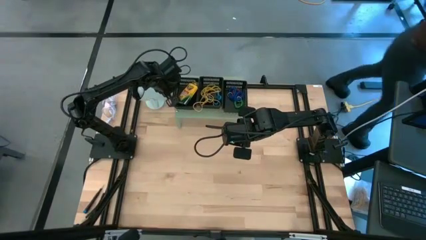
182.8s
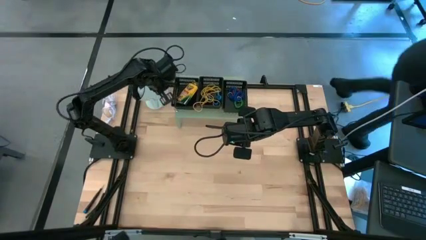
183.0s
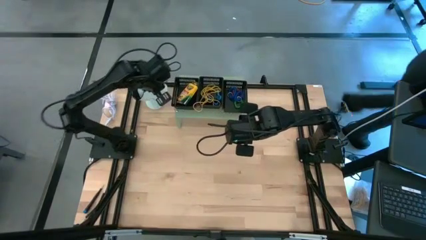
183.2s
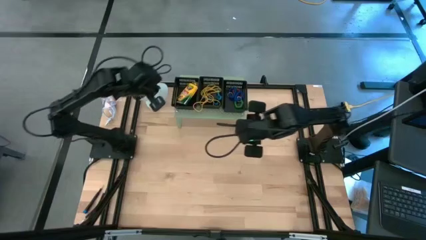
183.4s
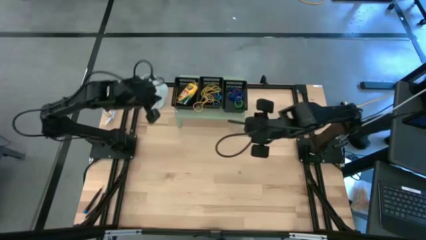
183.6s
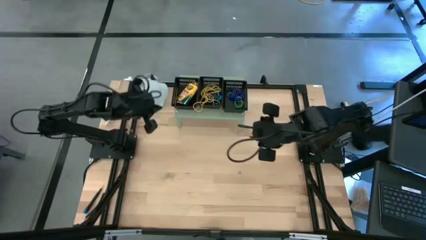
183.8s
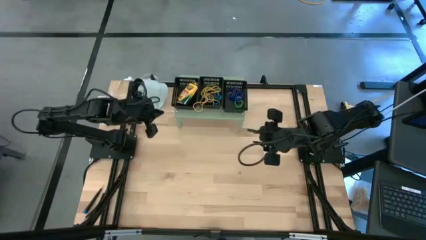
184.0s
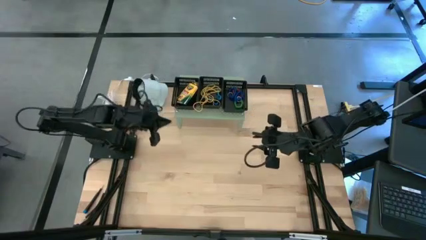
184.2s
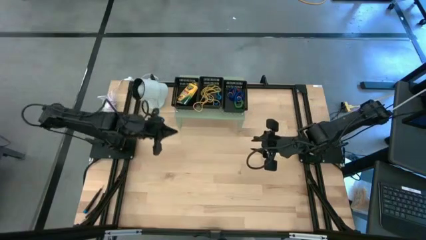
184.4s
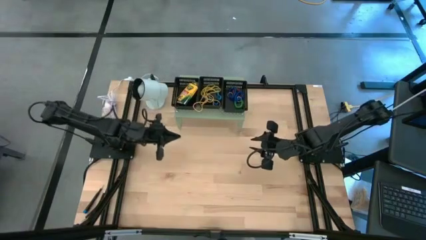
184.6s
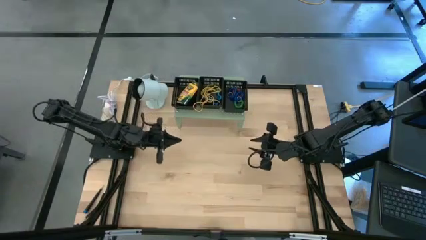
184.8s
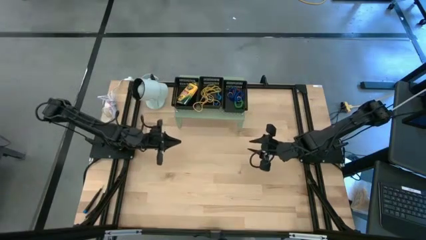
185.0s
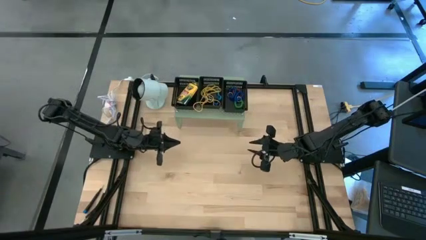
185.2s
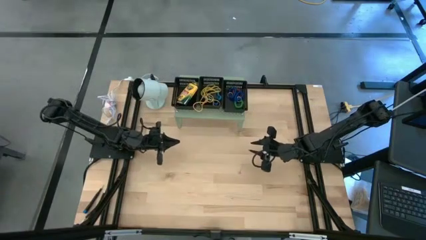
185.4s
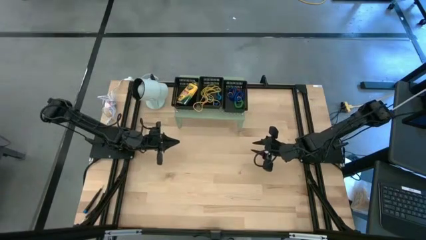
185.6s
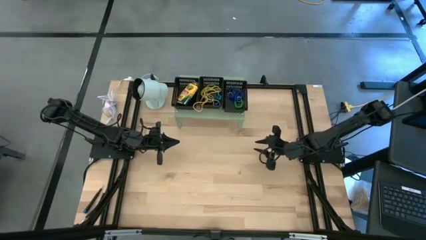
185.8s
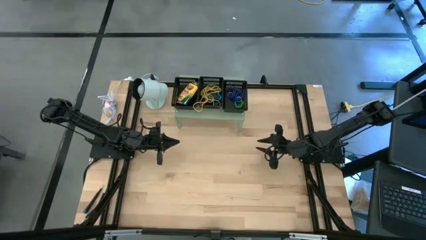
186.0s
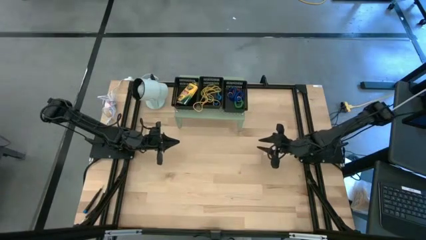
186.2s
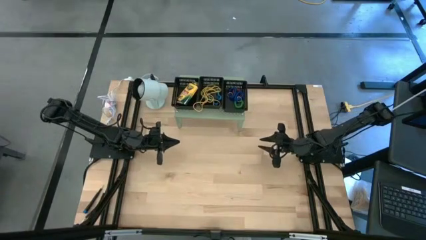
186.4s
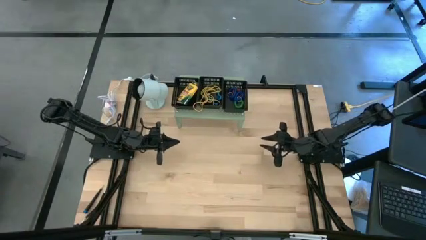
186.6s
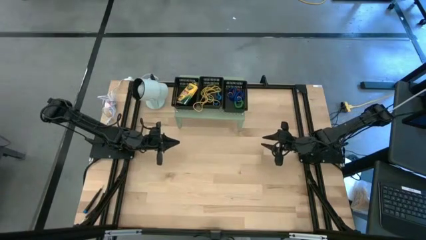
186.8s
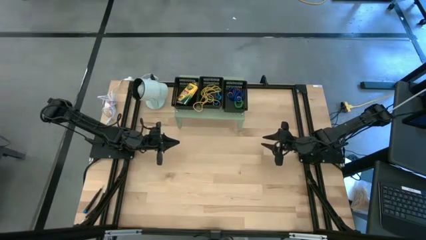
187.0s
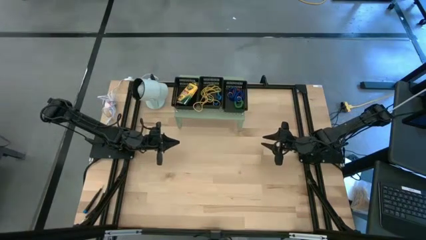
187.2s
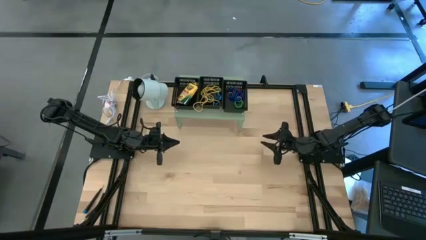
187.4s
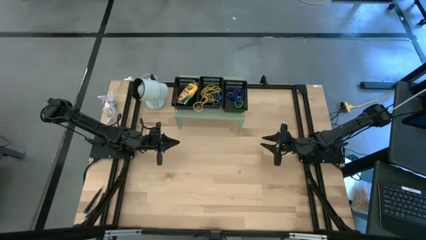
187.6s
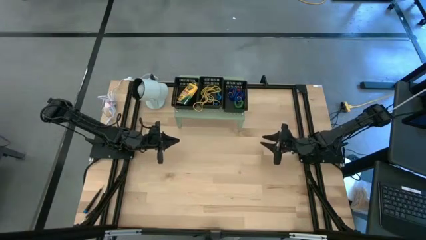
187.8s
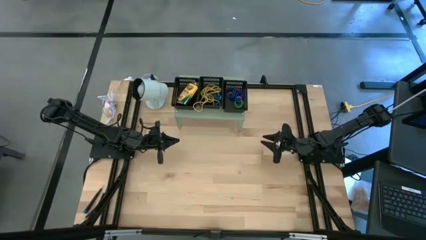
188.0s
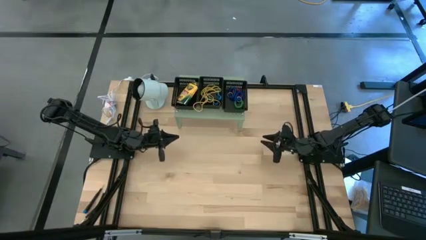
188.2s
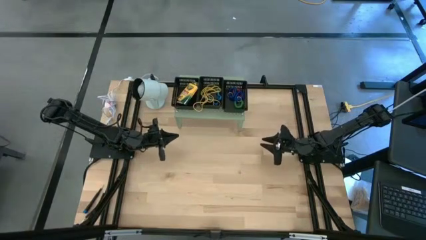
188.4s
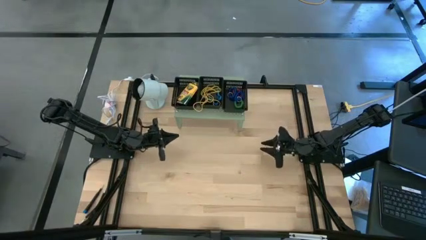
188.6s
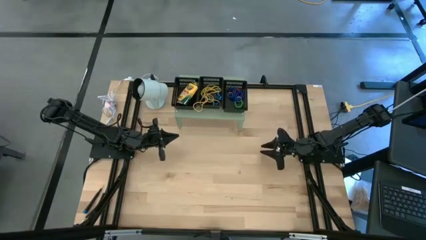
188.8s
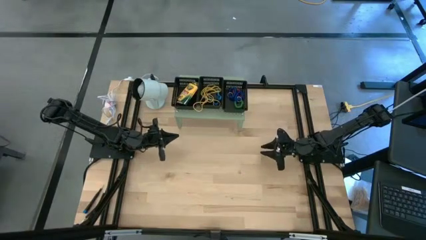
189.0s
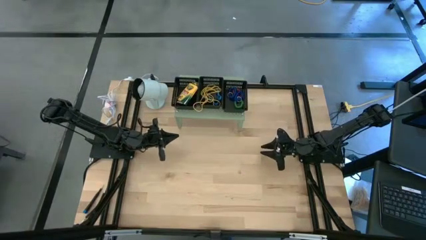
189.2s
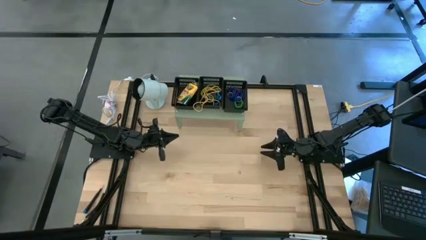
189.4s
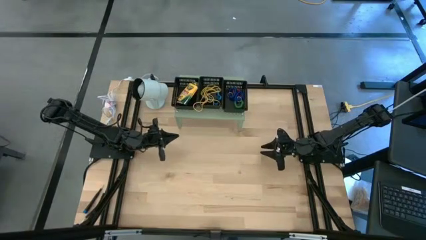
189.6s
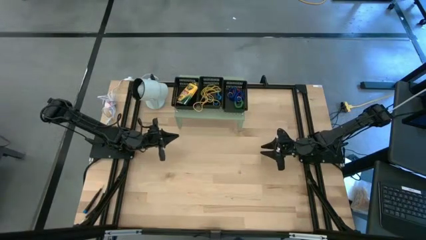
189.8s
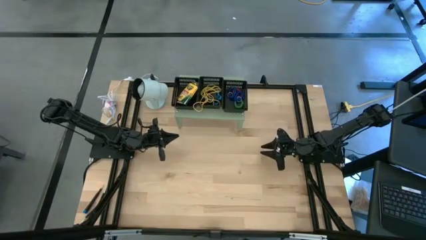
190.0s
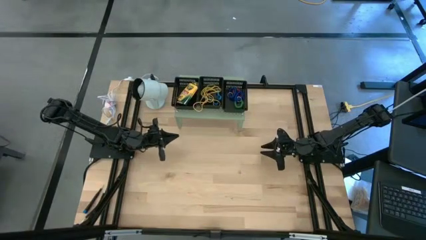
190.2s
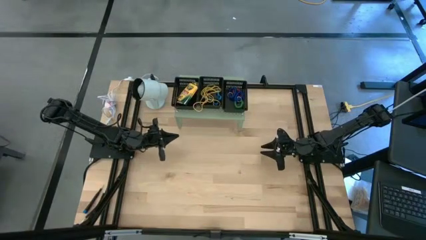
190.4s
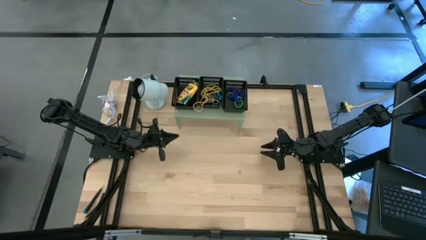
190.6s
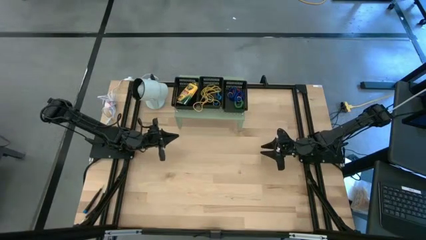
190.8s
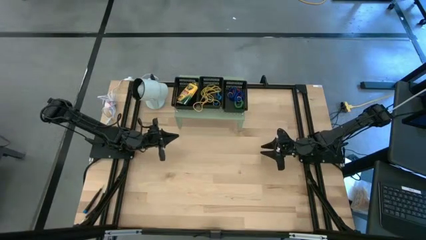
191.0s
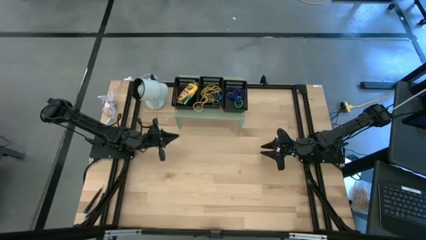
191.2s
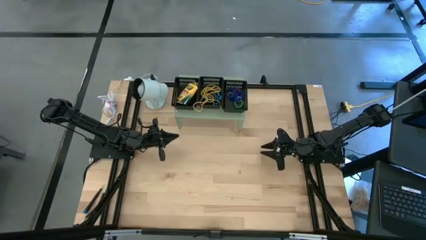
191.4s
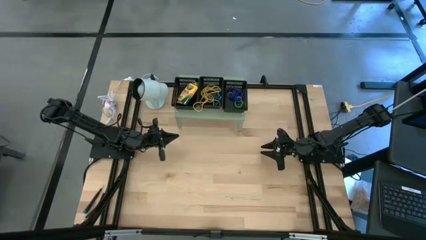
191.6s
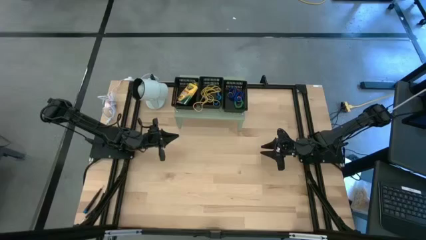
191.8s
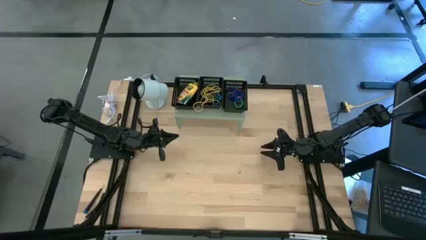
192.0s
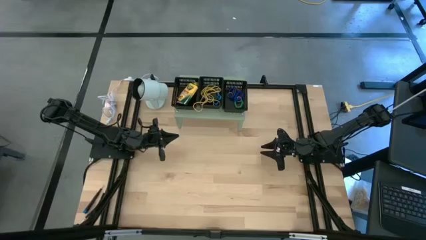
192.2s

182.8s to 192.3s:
Task: Pick & Place Office Desk Supplies
Return to Home Position

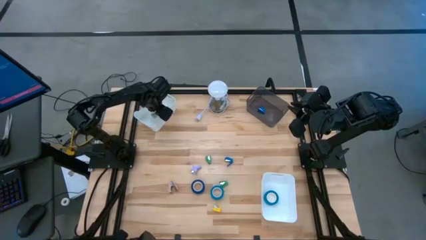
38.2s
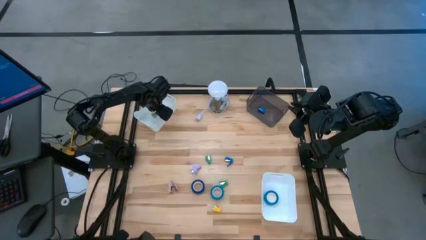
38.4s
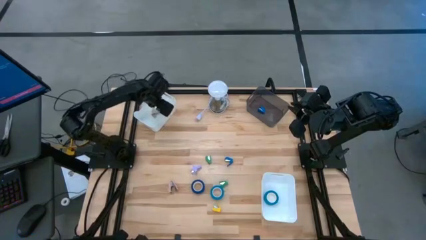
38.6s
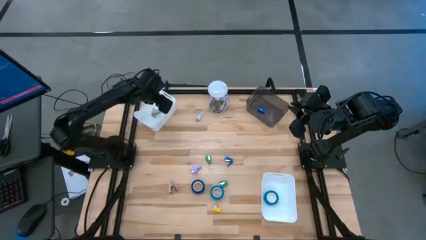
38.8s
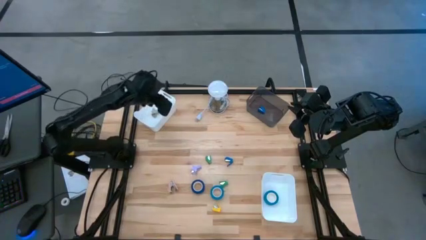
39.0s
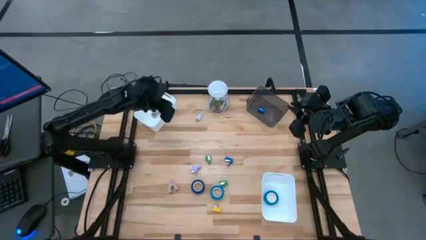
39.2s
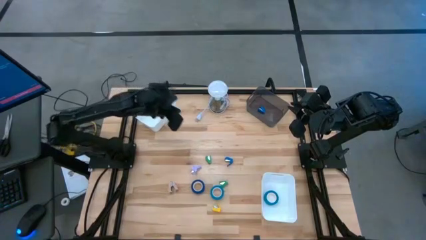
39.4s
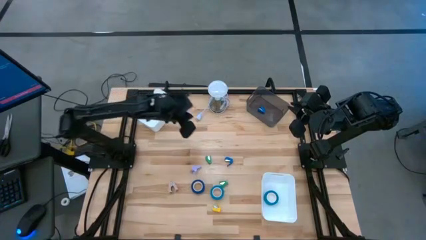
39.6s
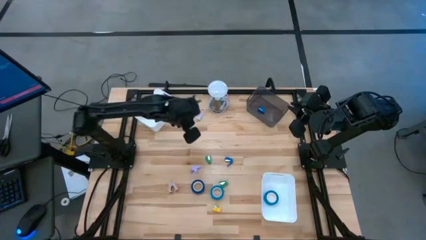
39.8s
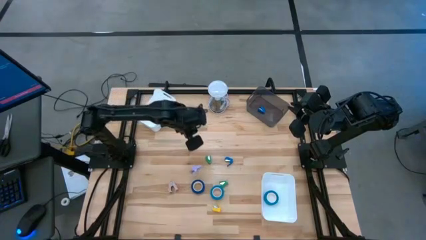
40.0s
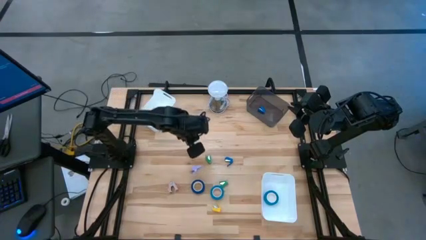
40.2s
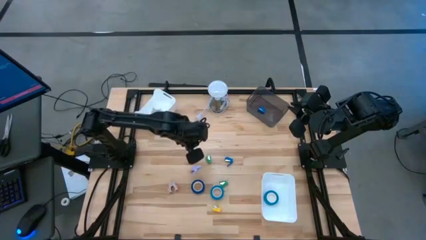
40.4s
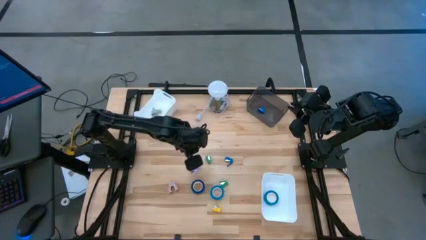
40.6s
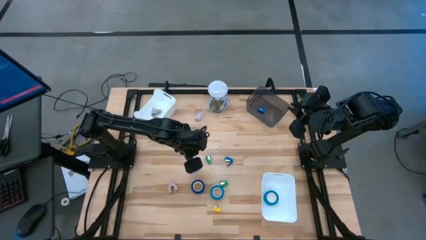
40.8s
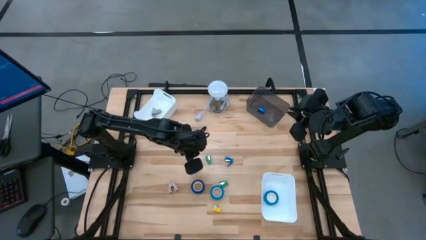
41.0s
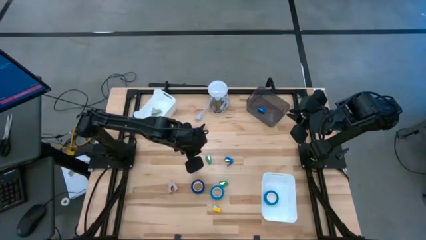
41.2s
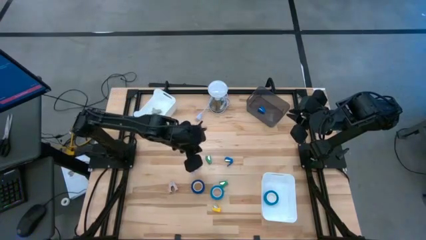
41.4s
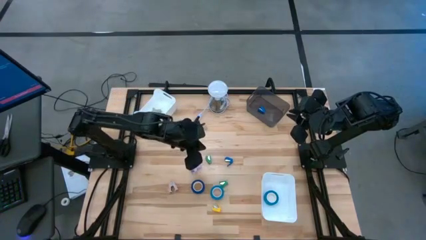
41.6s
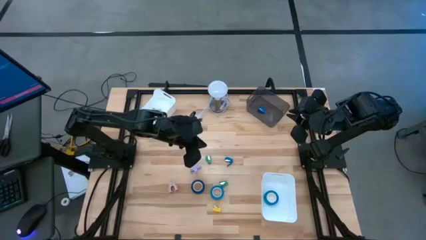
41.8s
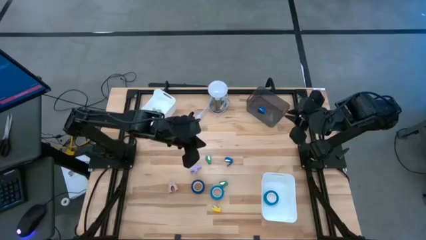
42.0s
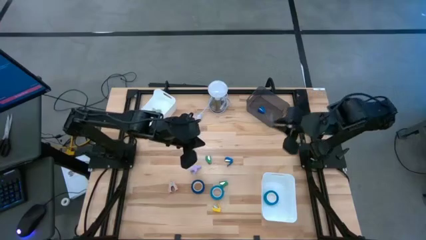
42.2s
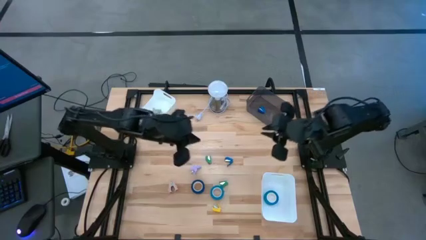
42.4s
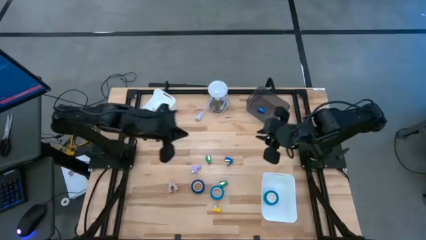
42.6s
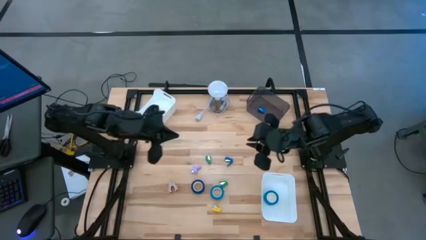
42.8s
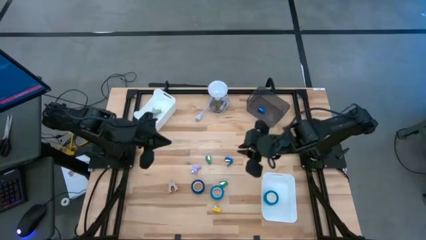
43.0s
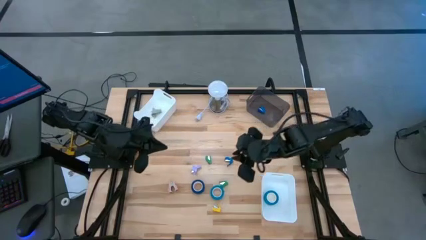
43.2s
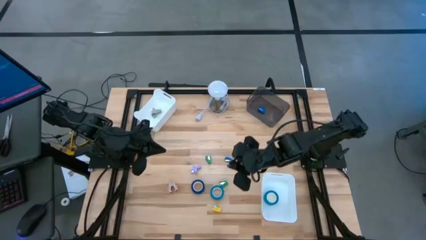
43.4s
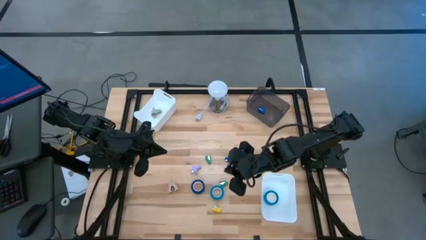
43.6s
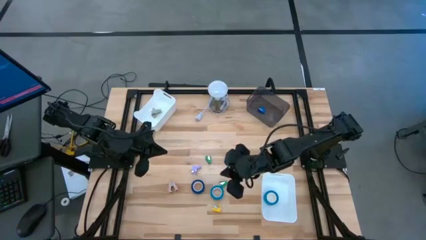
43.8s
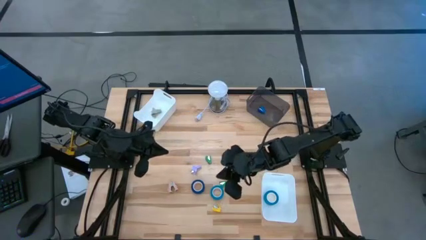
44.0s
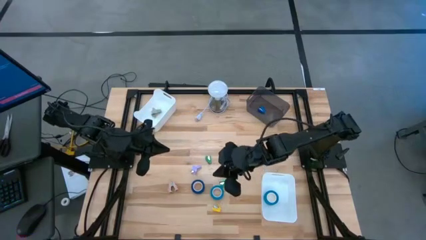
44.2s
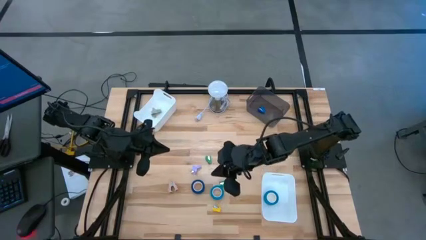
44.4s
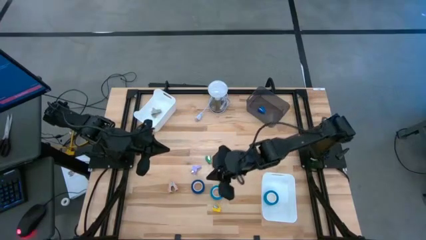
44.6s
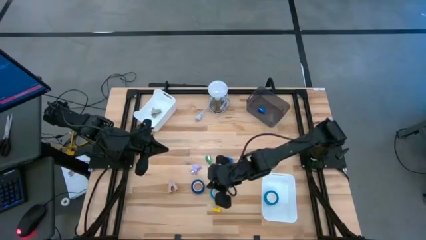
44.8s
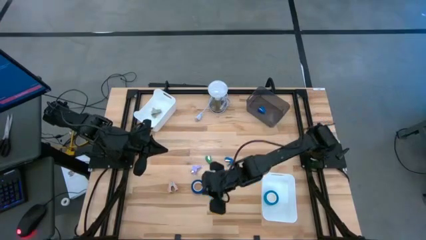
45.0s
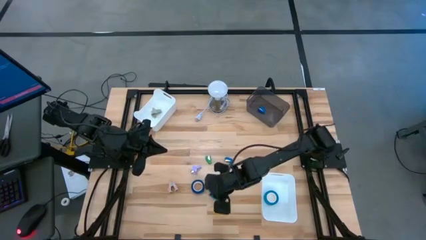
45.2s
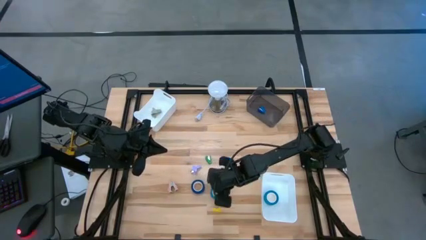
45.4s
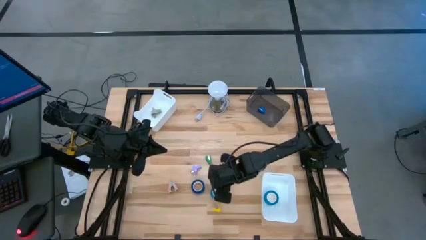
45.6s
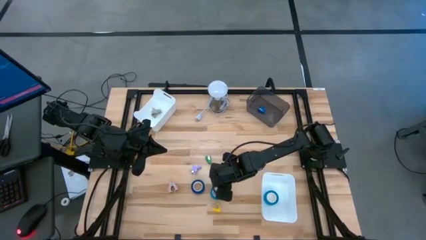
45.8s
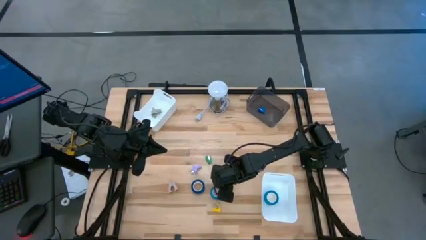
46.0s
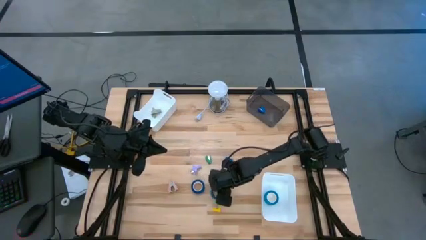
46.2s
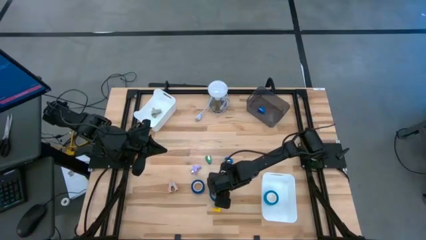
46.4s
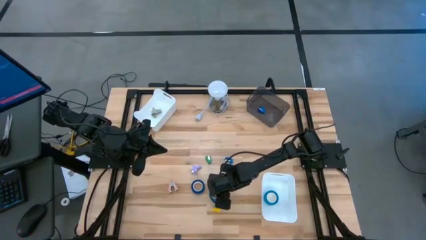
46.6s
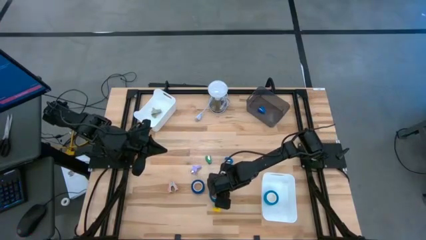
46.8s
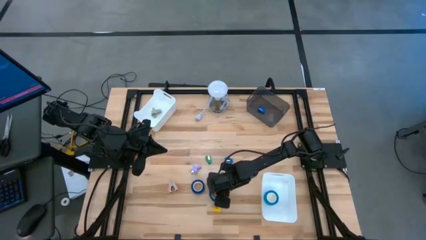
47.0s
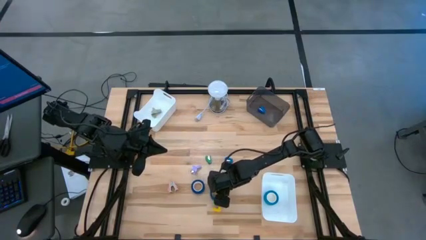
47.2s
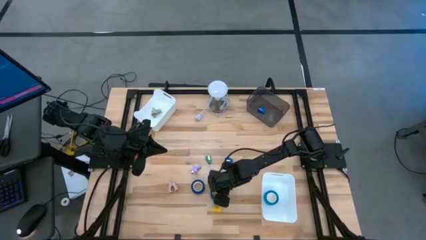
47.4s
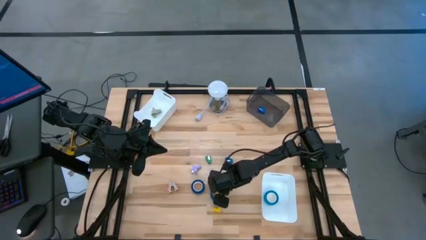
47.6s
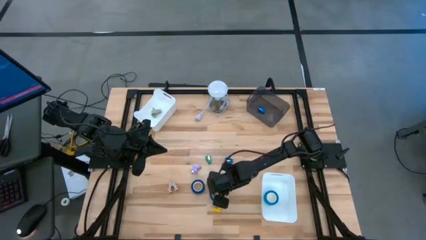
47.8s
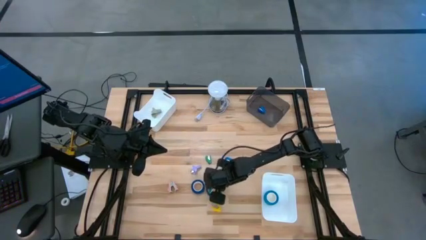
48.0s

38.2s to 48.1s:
Task: Pick and place Stapler, Stapler remover, tape
Put the light blue tape into the bottom white bin
